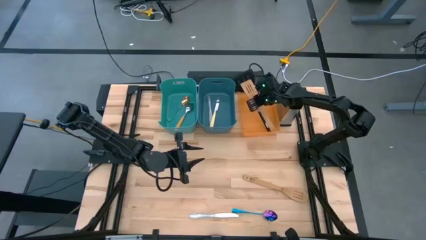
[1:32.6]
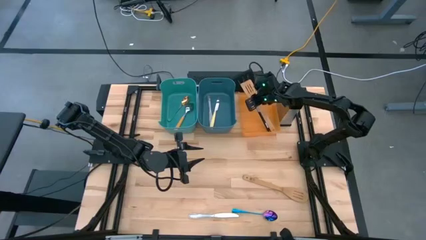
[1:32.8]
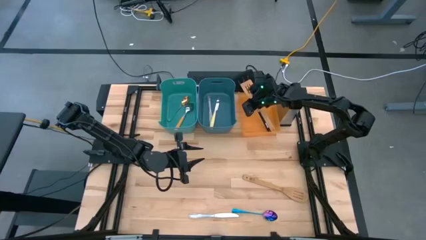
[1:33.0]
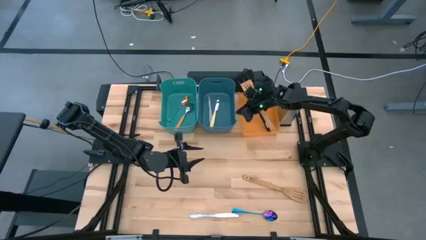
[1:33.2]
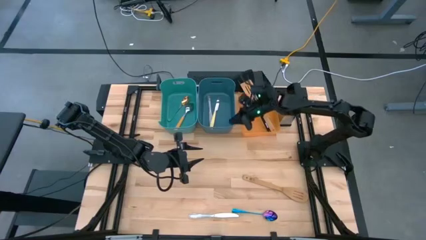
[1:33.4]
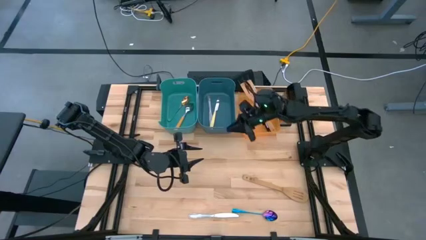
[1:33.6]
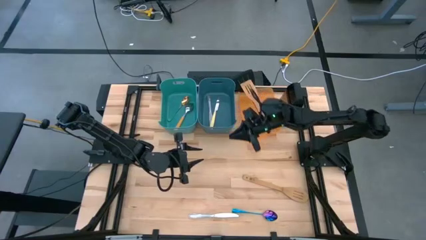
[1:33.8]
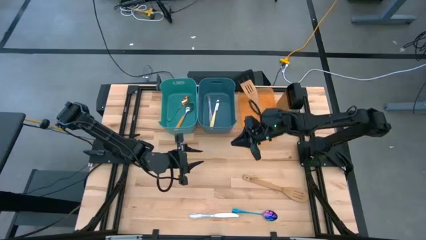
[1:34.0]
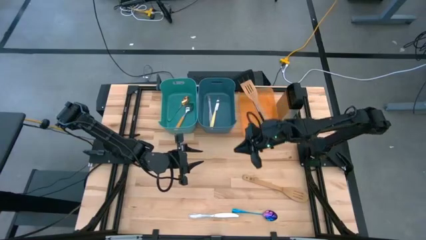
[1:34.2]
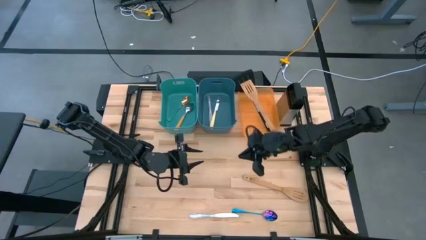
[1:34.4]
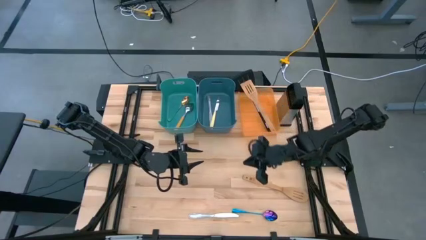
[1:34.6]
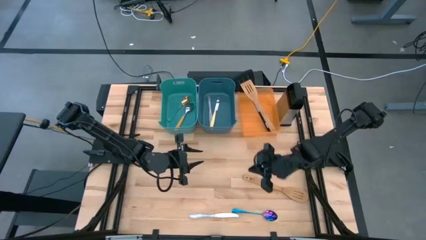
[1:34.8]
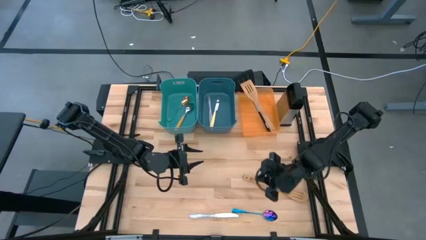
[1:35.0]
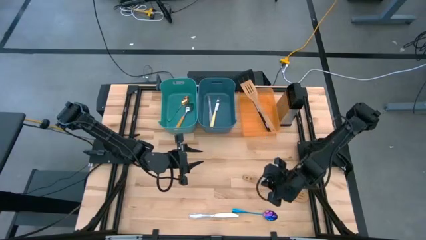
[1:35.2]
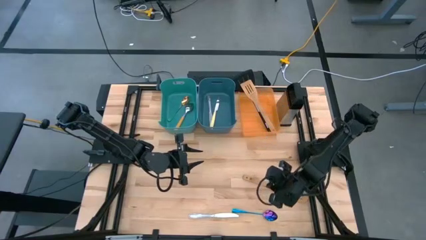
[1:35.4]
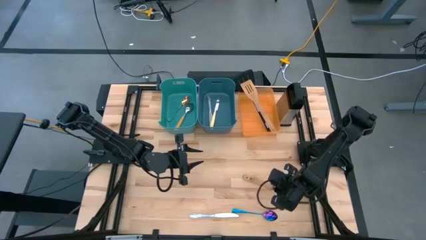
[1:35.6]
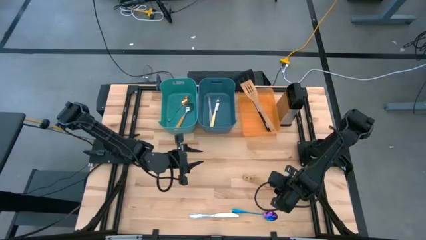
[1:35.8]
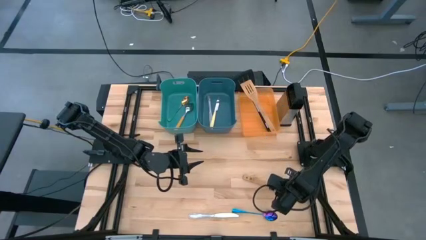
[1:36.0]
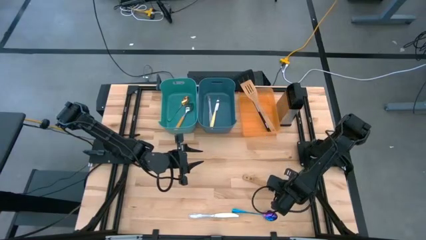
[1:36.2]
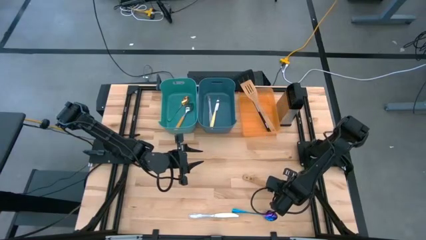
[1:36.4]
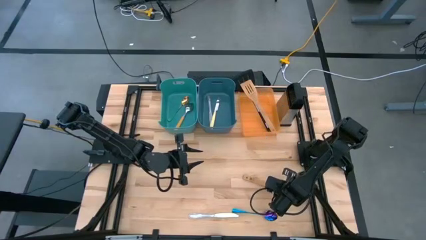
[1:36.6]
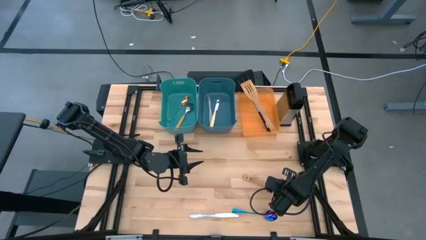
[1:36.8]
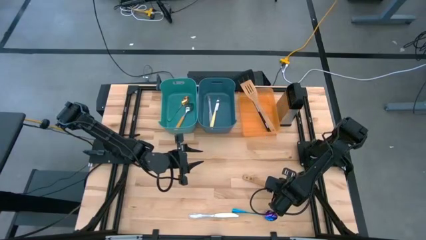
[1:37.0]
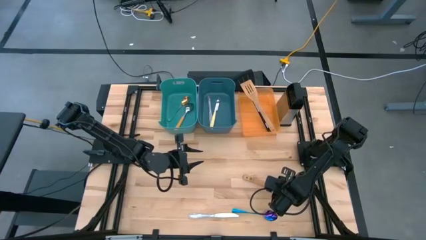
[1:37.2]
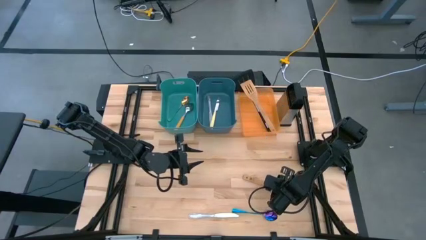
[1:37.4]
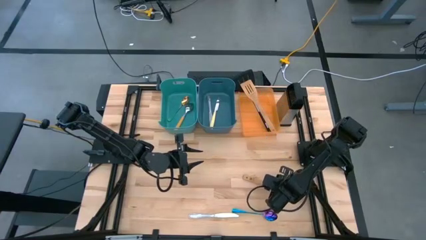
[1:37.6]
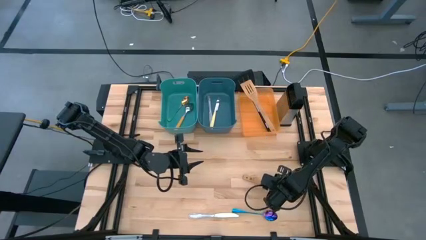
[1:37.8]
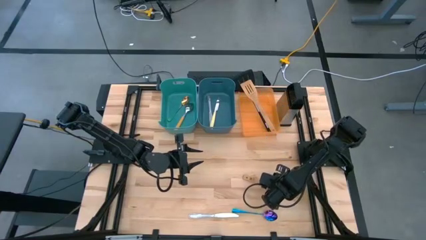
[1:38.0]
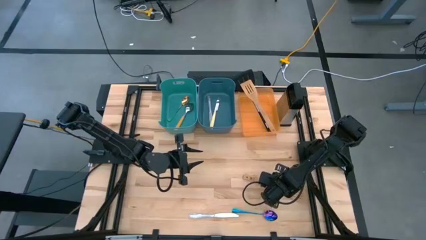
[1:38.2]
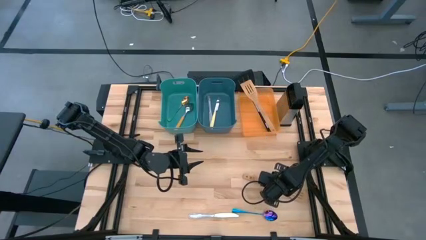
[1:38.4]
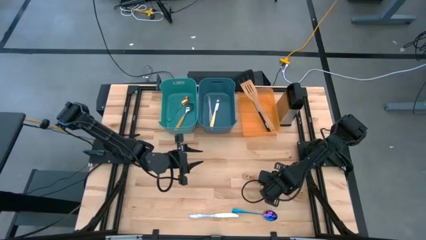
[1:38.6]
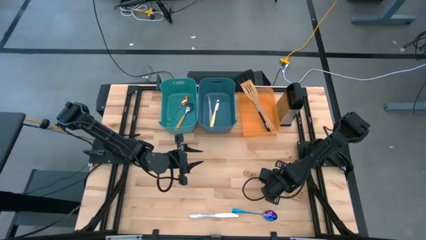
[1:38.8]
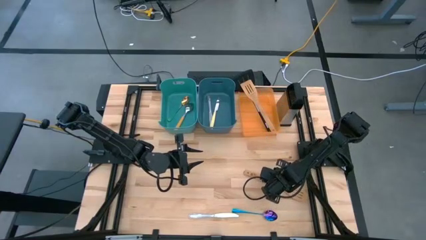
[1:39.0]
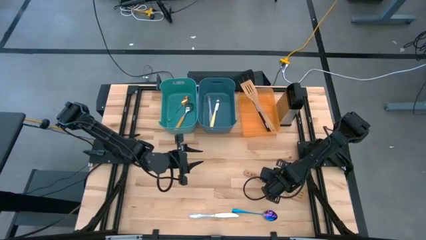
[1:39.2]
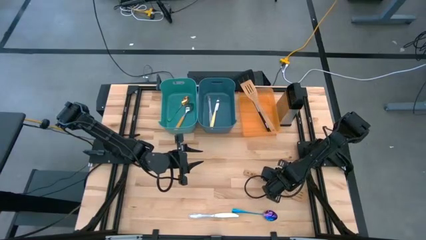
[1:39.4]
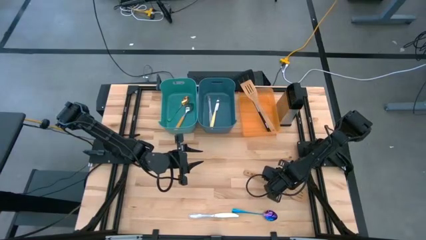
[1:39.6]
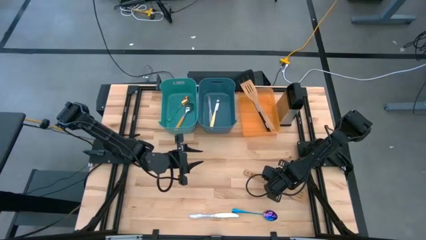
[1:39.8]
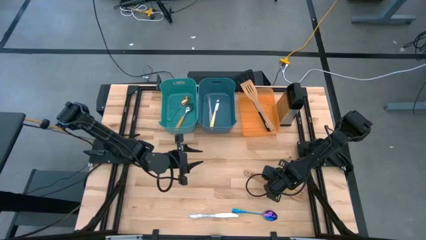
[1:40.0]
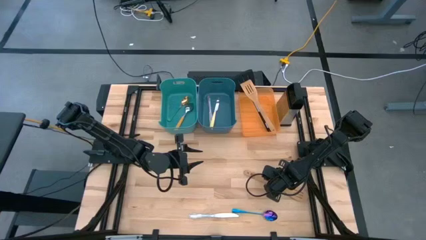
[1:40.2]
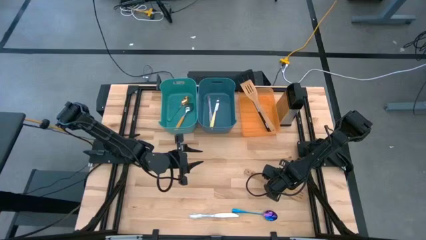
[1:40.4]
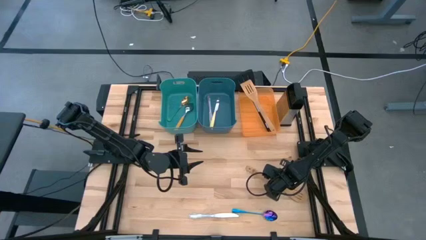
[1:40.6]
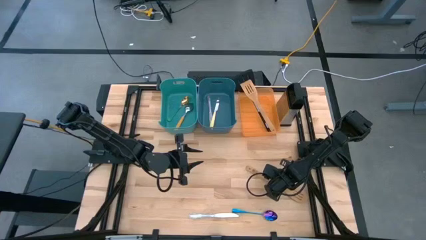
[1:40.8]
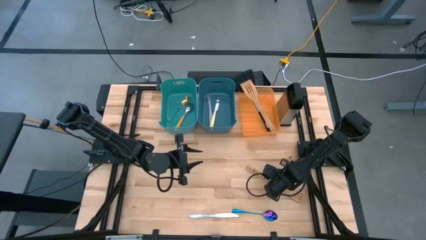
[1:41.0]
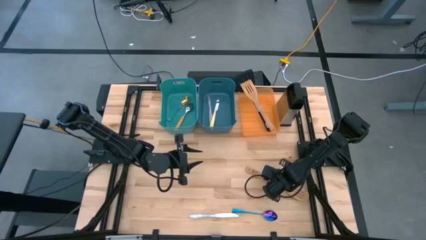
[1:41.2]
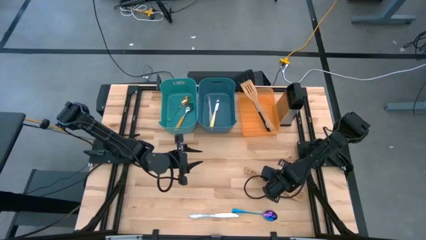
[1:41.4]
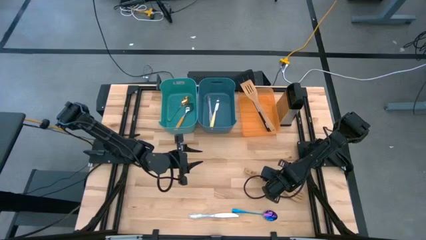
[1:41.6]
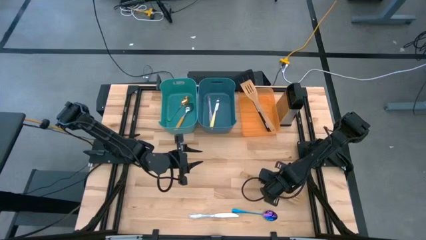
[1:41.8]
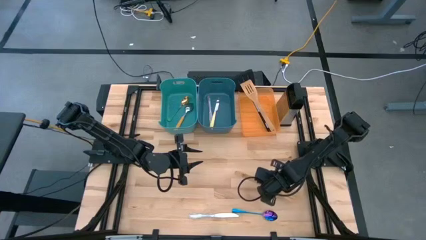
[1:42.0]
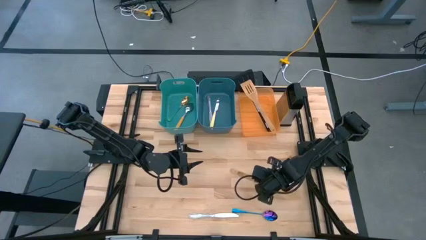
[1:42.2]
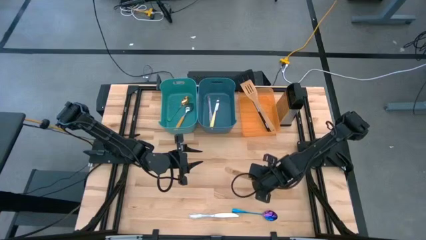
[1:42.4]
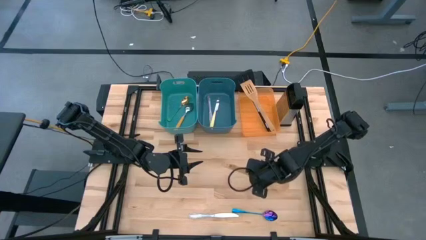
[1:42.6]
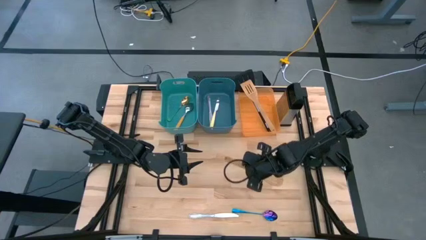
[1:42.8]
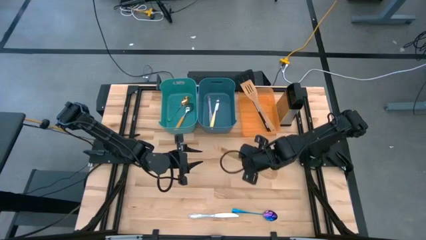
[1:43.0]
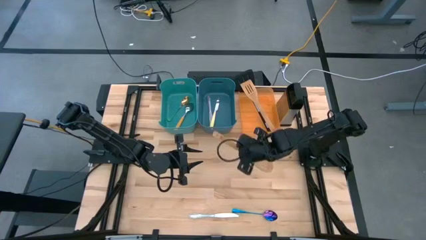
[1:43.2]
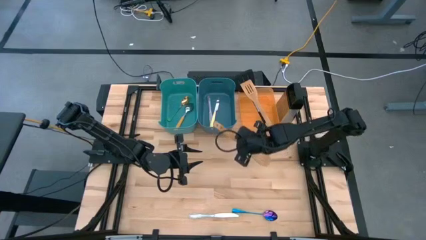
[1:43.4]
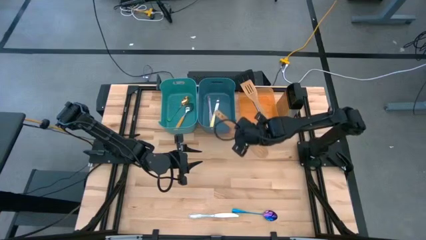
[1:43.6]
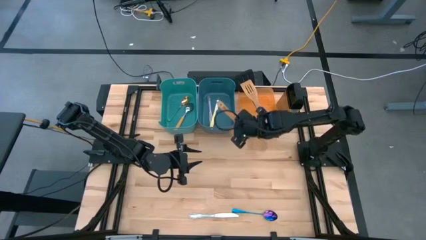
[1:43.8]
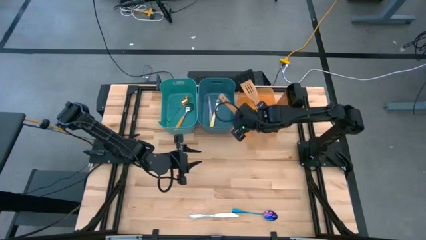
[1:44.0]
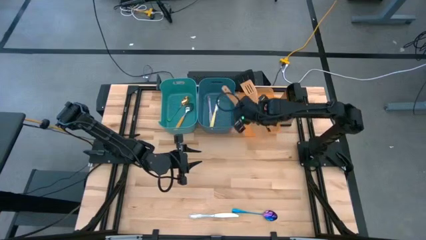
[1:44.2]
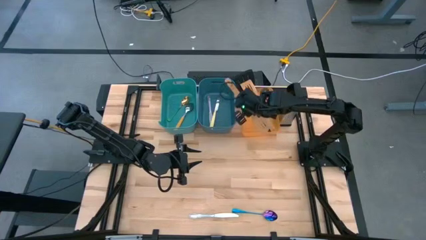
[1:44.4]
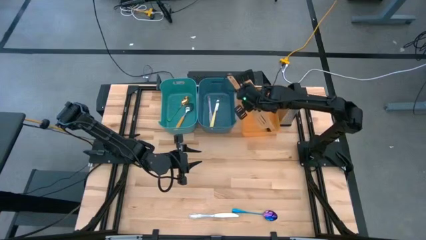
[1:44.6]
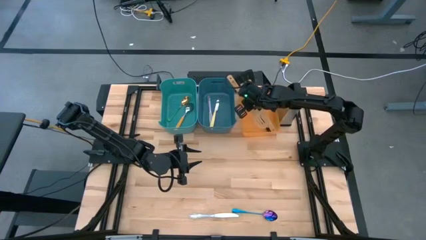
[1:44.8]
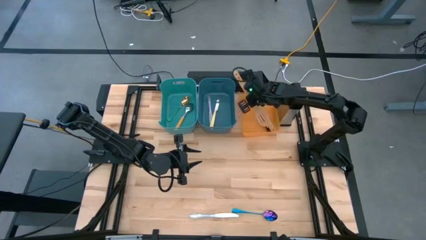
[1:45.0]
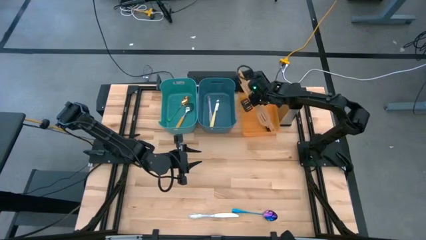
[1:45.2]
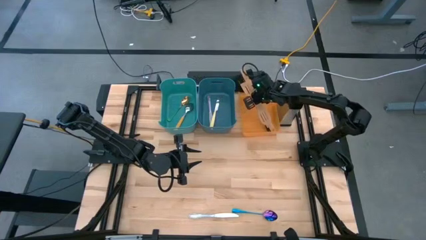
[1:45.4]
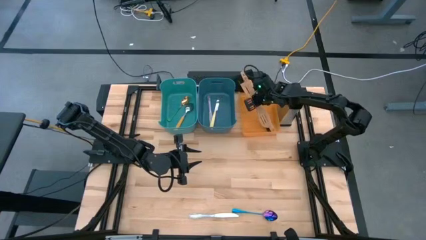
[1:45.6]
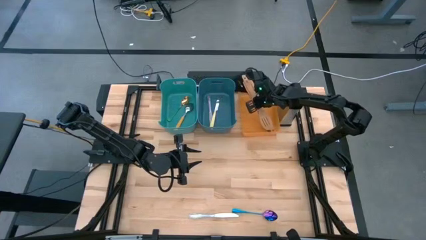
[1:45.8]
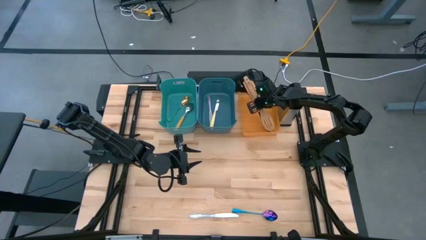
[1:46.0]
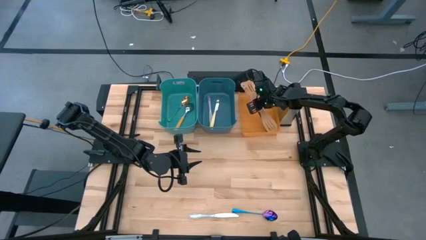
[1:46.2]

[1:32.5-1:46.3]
Task: Pick & Place Kitchen Items
Put the brown spatula into the orange bin

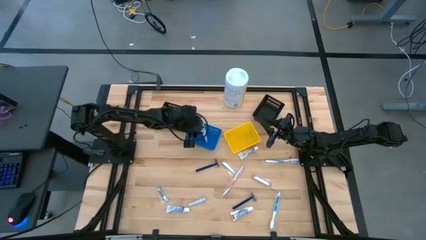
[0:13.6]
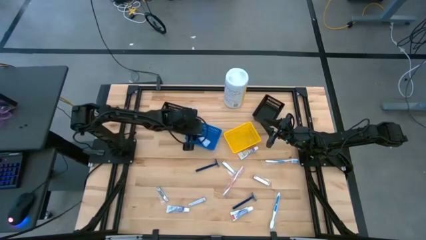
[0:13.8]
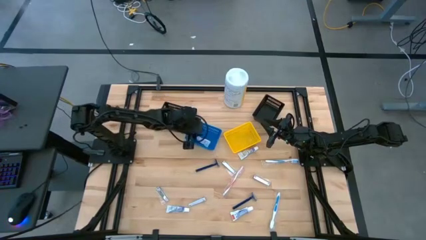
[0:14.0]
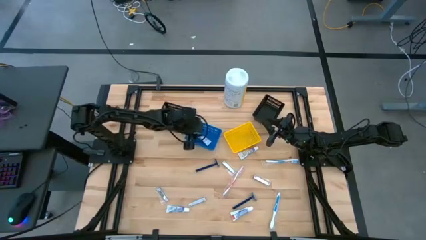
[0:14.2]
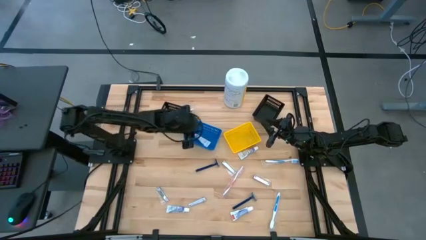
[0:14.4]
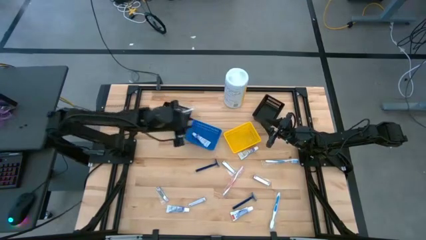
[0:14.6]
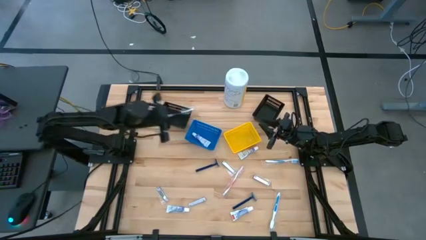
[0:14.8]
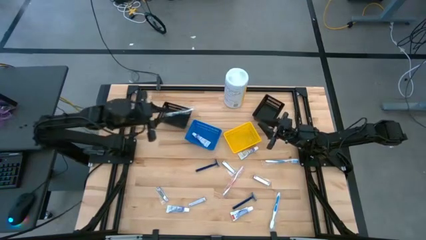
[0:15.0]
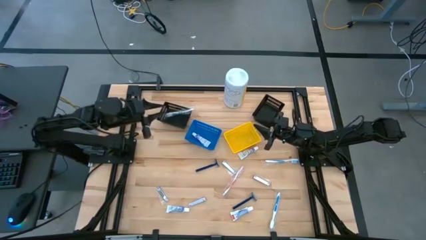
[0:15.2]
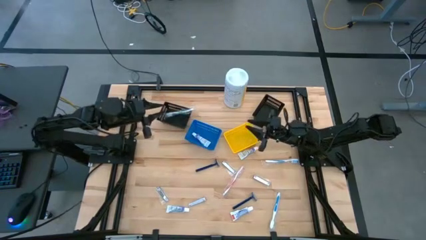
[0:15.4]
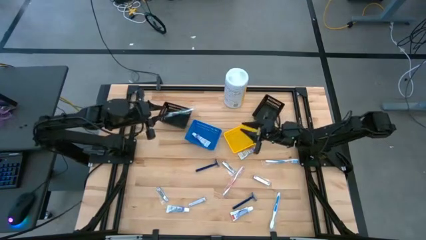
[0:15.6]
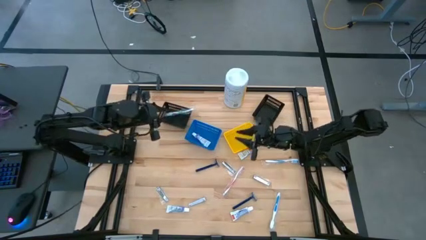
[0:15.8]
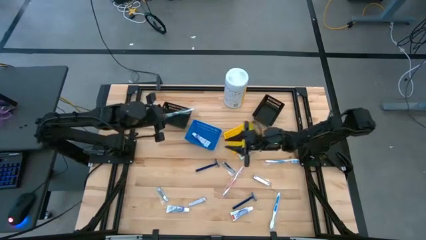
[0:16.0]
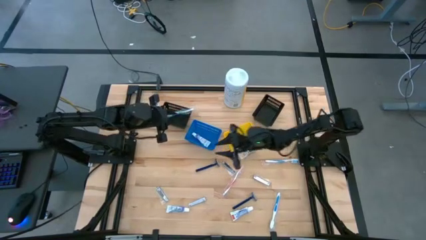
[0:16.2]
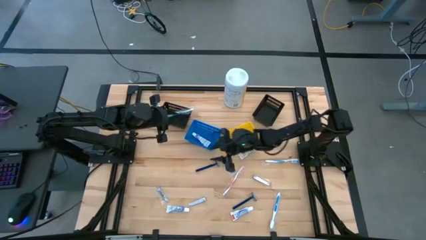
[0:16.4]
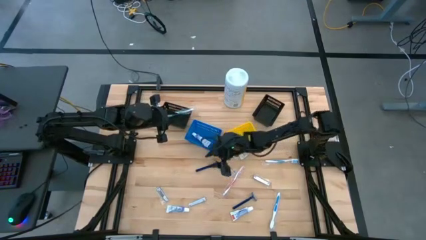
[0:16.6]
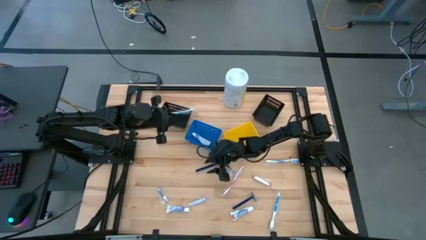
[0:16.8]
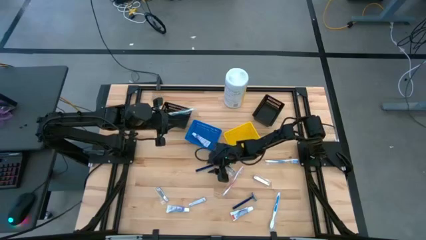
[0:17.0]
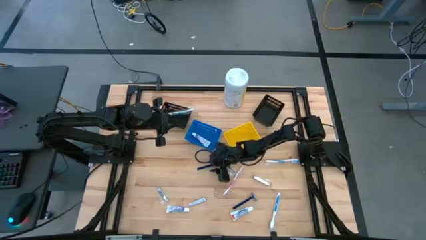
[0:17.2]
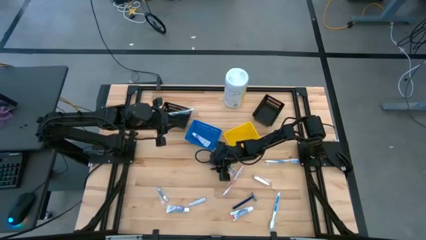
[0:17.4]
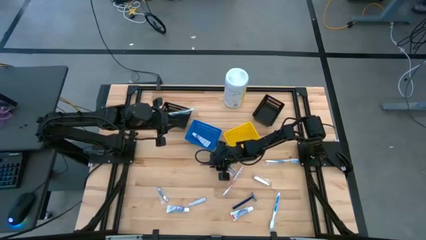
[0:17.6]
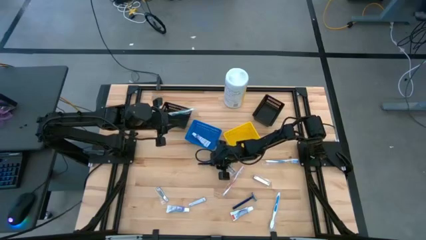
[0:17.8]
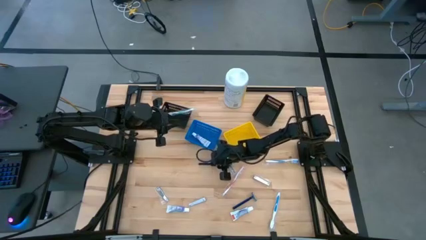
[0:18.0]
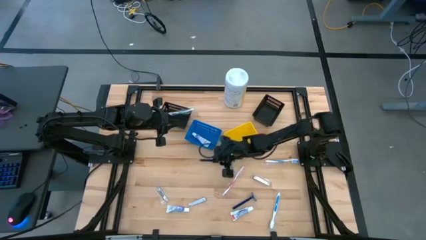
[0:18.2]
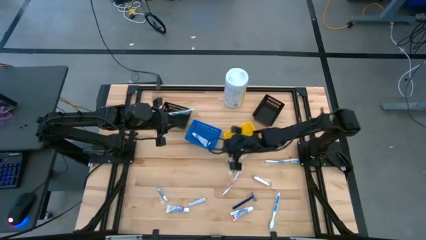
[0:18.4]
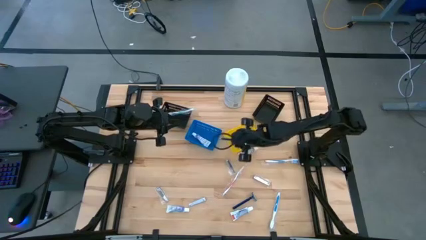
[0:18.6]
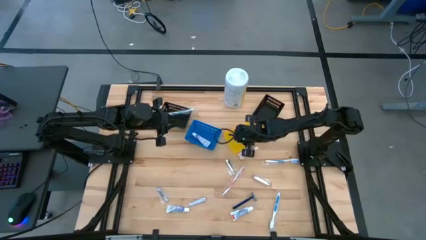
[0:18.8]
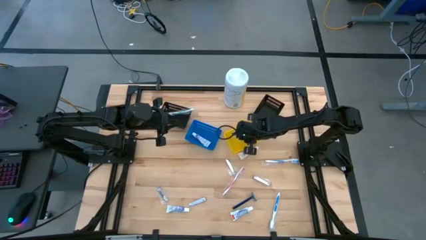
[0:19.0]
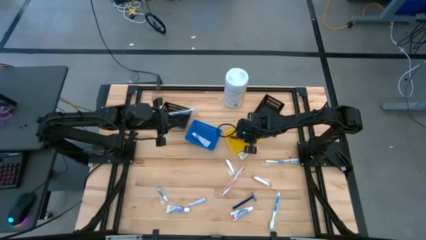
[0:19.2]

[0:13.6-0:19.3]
Task: Pick & Place Travel size toiletries
Put the blue razor into the yellow bin
